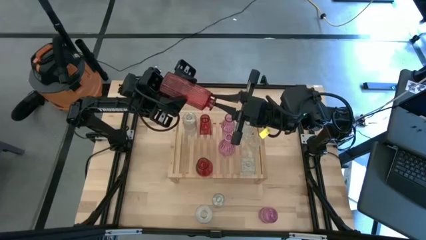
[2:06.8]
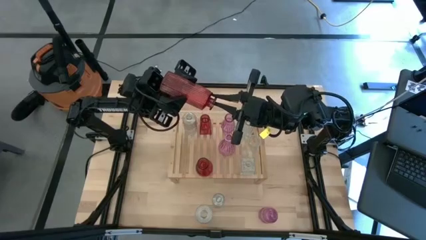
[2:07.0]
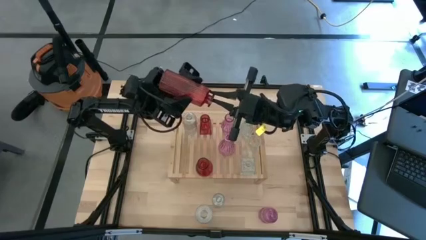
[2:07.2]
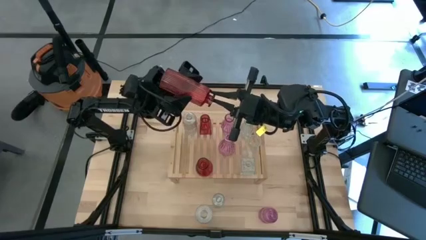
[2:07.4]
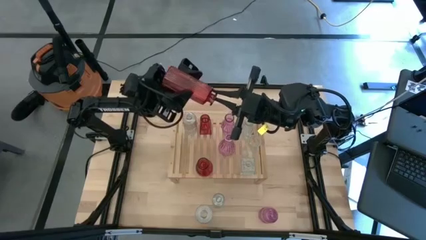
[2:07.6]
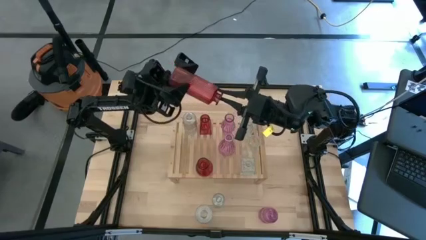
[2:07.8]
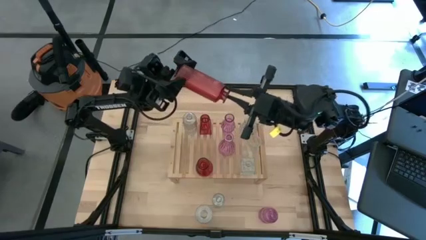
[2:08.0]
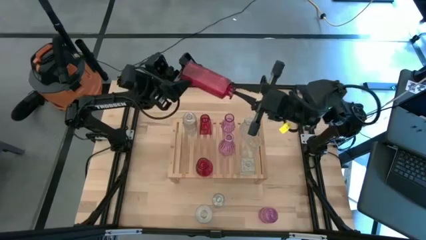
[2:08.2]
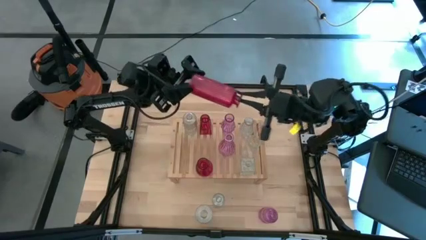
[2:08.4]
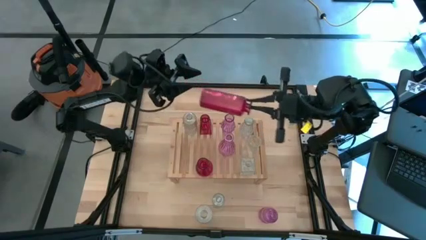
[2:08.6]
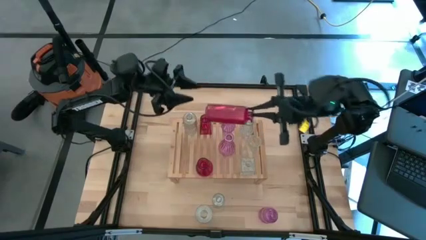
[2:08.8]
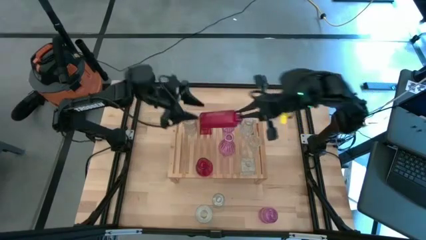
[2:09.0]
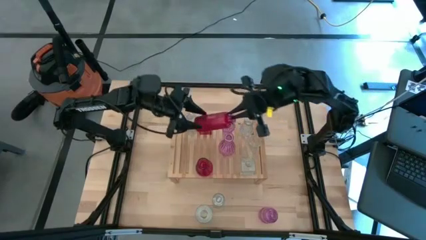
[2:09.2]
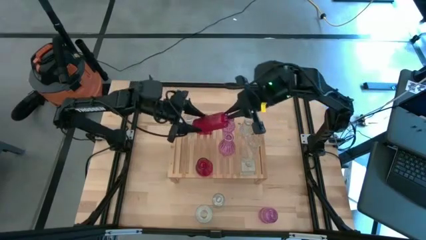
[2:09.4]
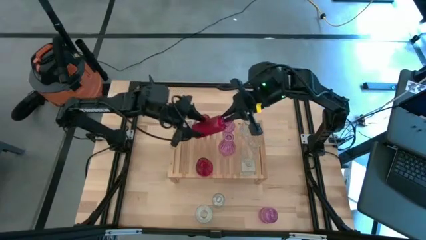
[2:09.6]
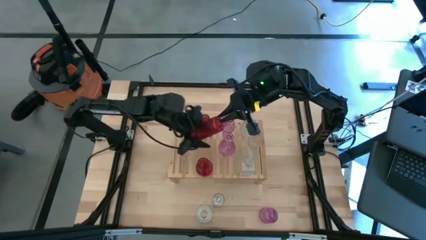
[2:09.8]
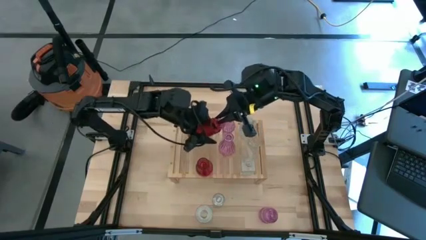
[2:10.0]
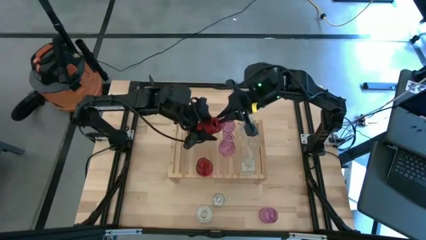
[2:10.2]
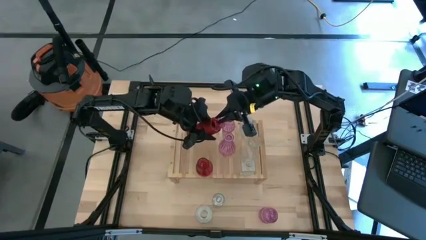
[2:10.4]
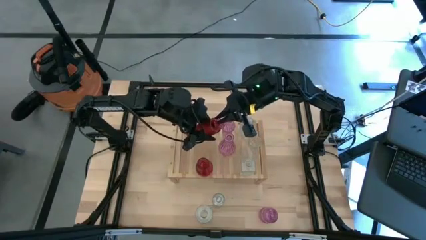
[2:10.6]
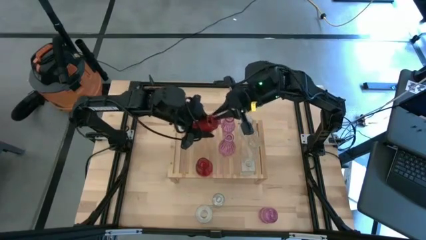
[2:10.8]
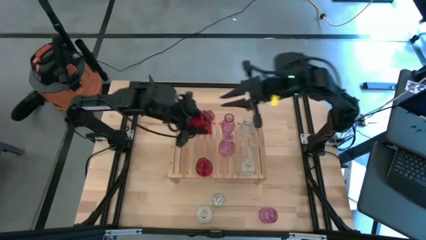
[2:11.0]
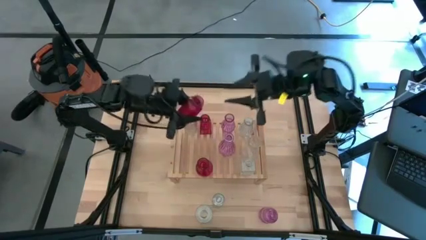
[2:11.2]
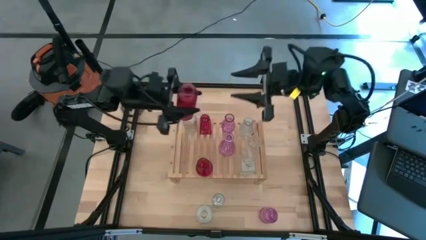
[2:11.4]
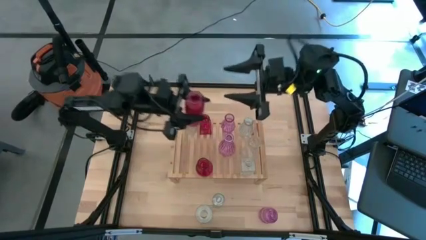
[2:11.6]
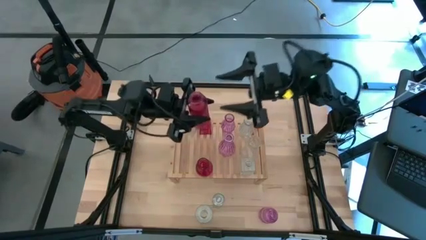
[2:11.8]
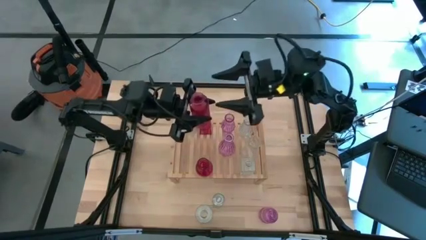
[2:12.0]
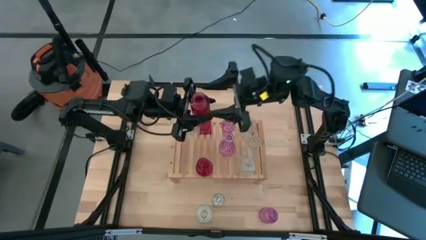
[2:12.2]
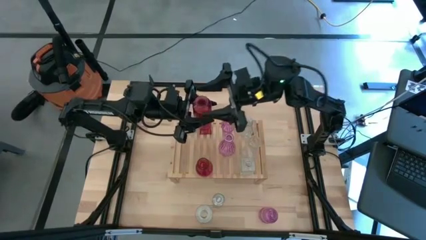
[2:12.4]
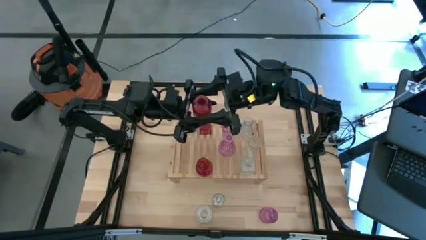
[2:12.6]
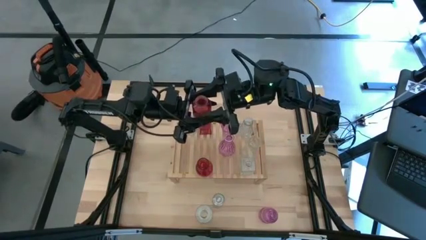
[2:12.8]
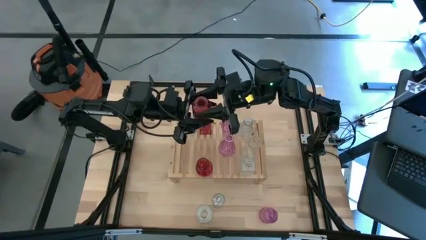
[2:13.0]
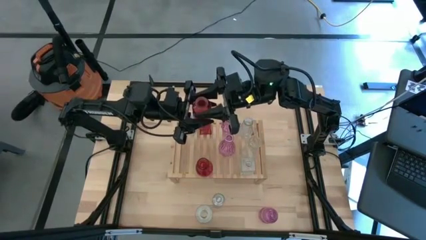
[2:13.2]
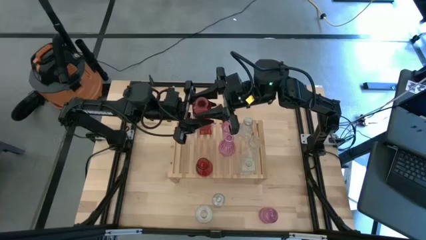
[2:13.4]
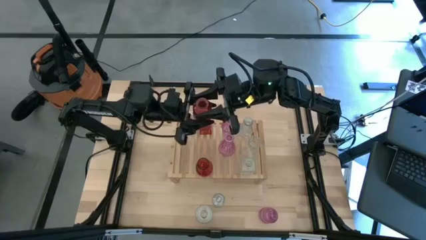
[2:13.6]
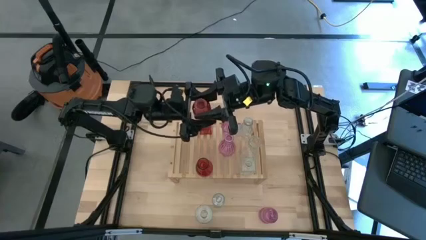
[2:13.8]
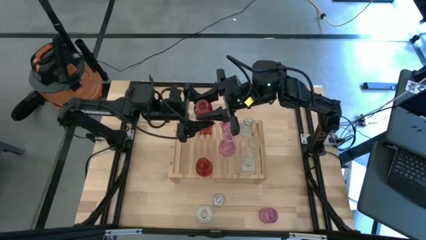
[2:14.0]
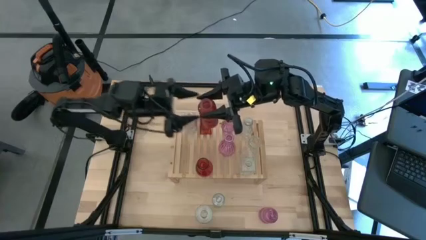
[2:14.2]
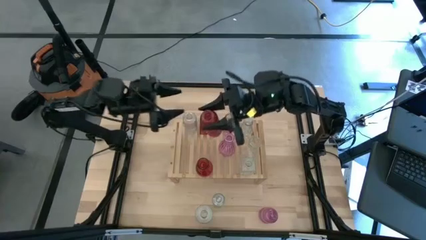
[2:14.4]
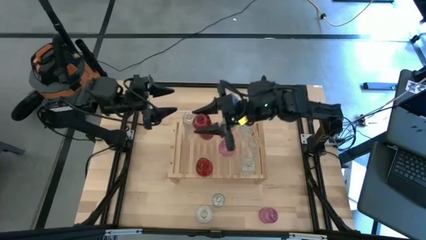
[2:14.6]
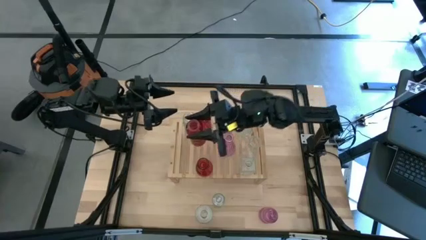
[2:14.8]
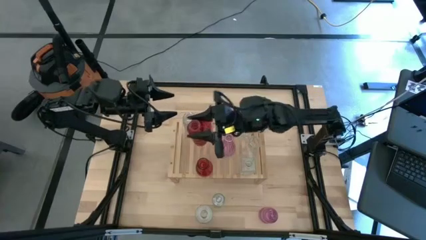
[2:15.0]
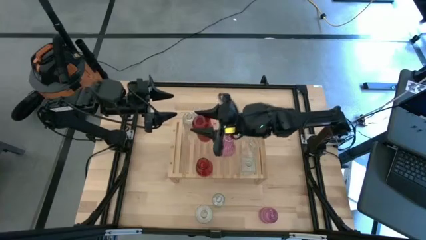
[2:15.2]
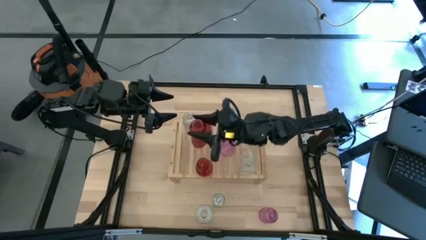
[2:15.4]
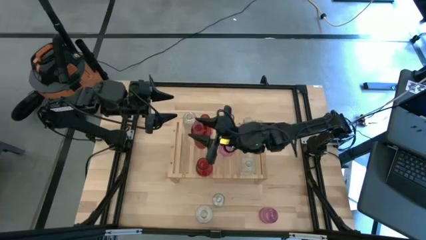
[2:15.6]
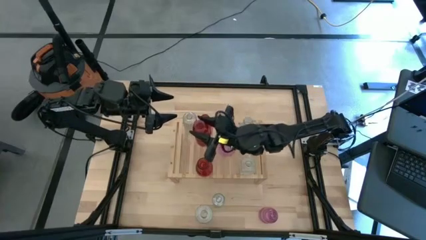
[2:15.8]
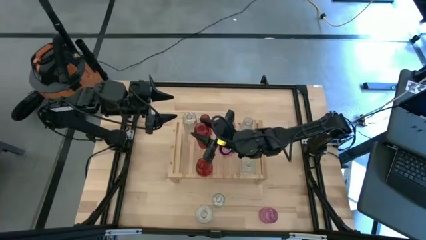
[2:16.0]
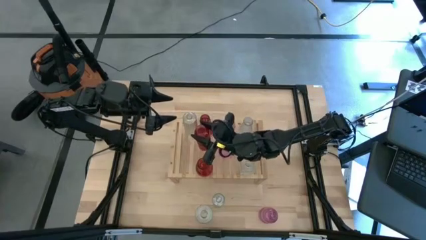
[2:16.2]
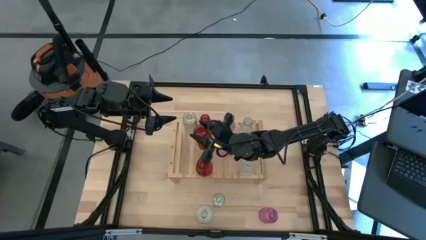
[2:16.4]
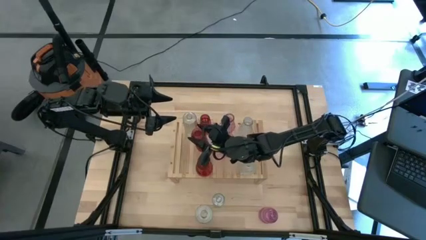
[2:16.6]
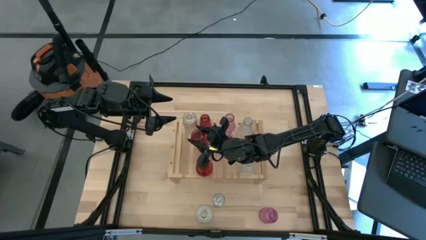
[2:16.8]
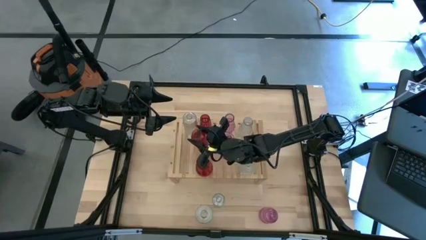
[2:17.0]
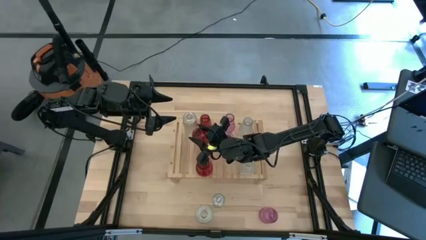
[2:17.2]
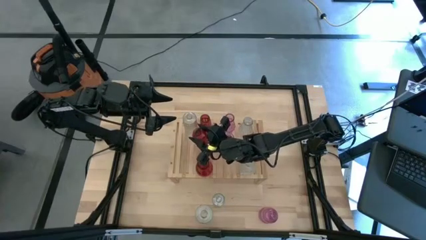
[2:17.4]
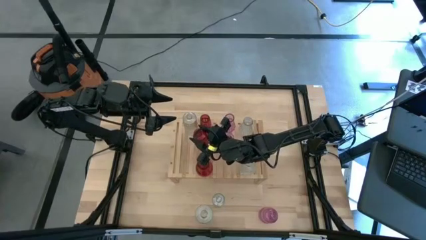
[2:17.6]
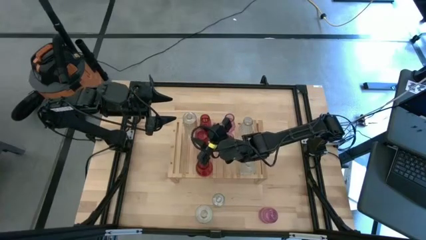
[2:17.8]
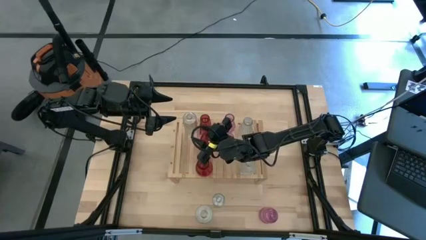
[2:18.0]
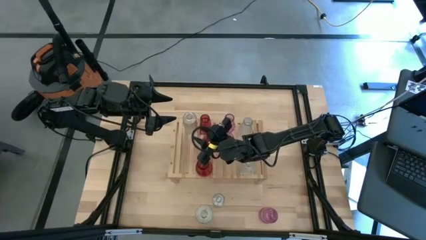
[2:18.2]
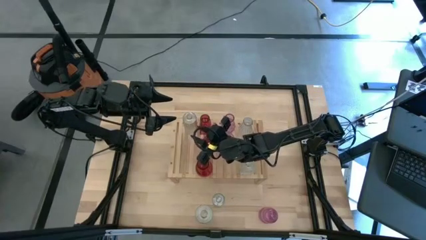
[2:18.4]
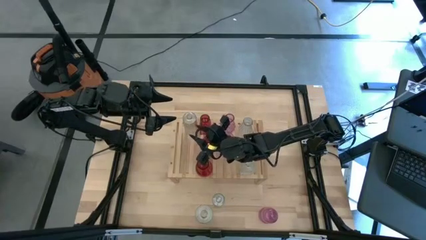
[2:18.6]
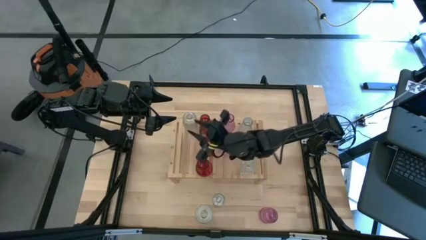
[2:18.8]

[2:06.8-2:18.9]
Task: sort vases onto shelf
Put the red vase on the shelf aligned with the other red vase

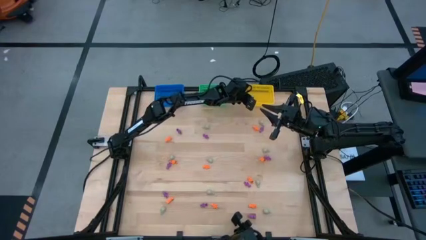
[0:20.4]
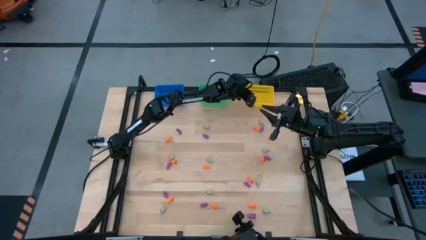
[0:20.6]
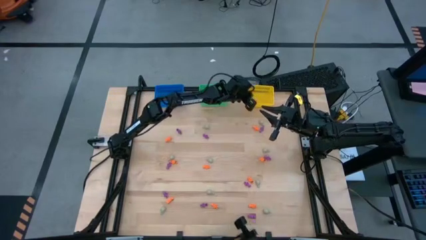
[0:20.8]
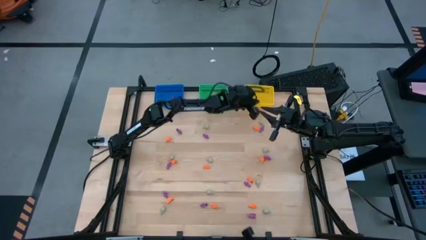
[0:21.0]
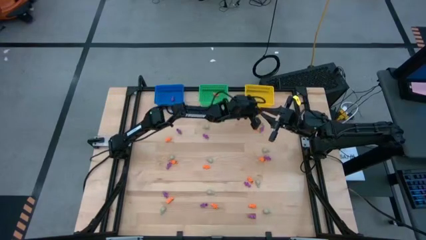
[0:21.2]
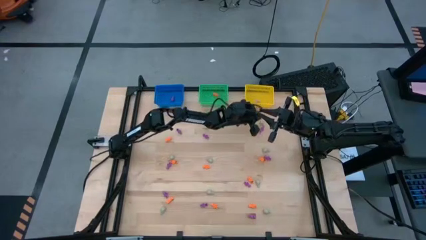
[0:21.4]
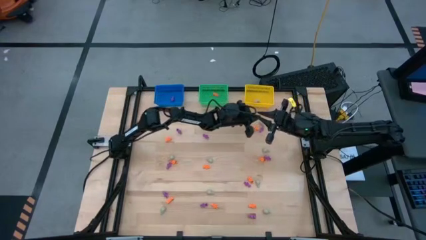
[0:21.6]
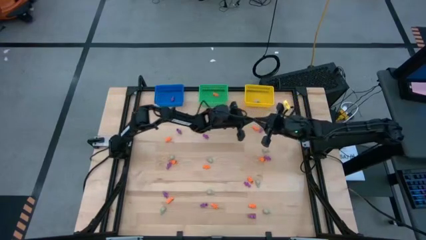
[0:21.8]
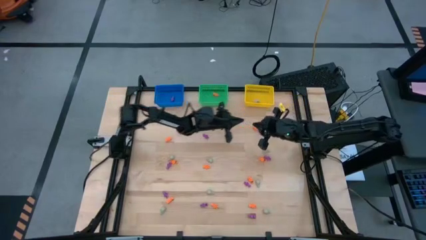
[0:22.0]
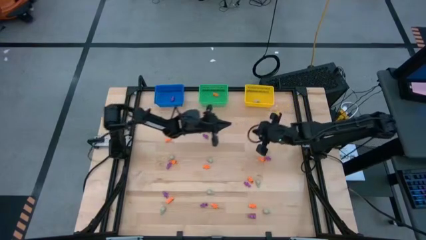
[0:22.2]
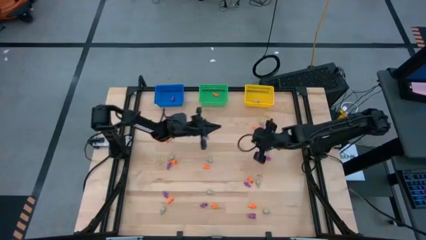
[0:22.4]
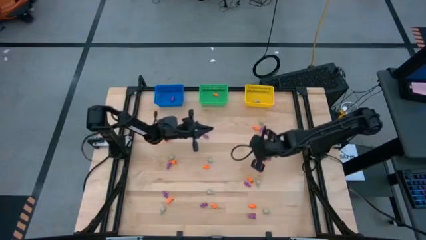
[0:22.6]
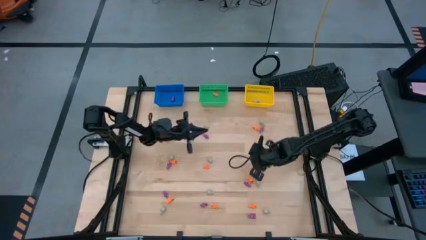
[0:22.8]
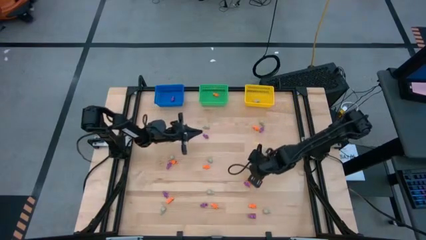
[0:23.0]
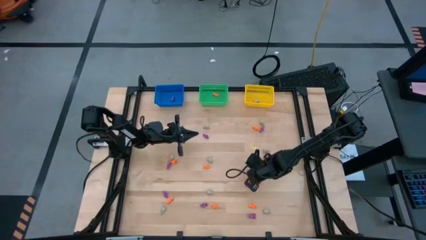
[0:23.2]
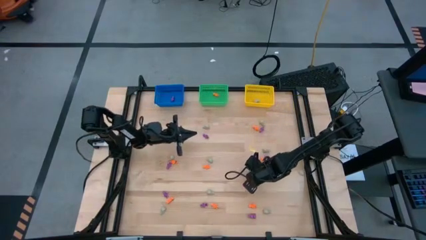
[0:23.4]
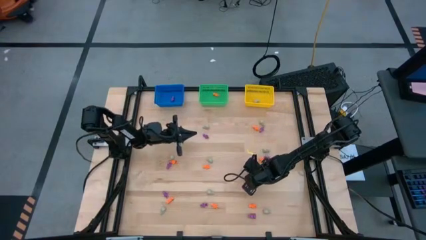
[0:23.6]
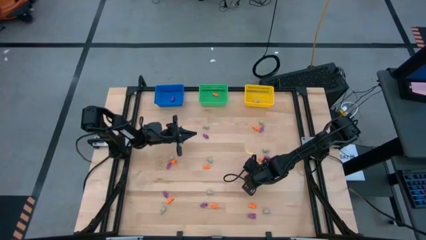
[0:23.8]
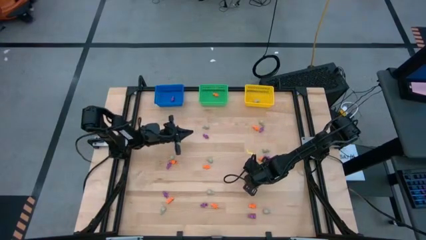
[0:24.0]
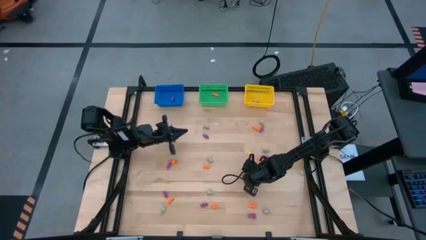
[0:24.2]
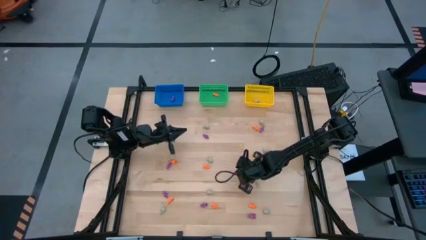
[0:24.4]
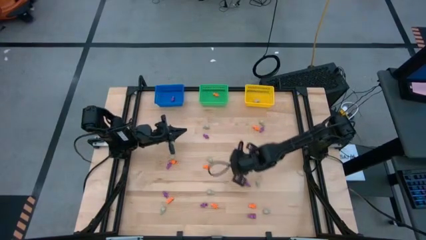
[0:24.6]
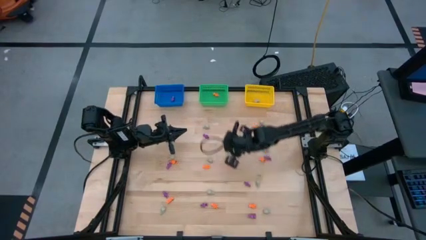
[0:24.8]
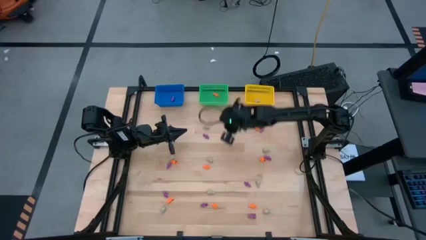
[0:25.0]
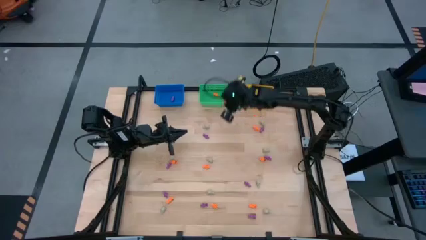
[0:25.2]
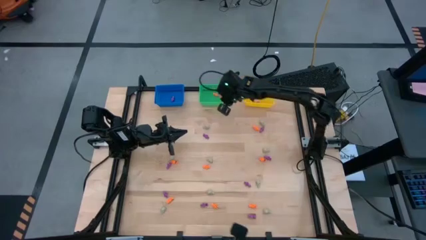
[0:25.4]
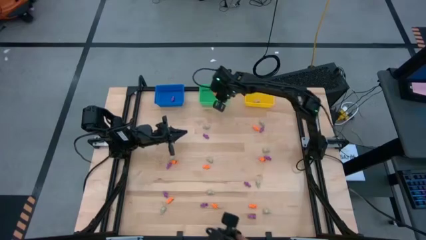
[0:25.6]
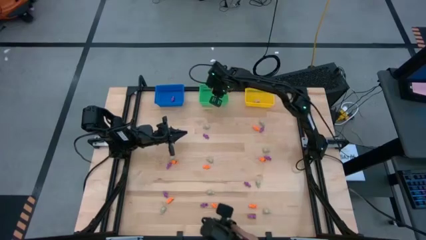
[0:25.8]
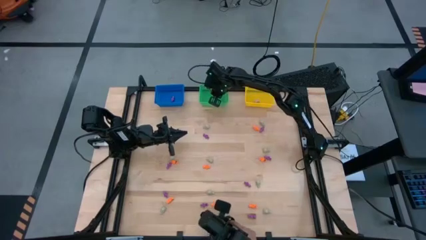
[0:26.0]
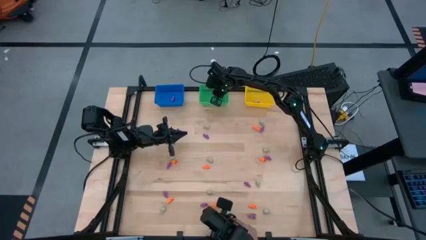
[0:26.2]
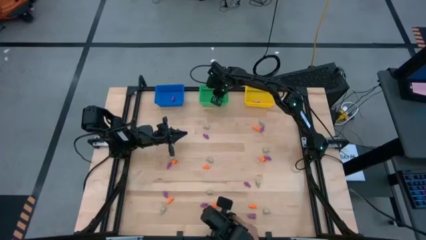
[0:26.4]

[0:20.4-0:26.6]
Task: Sort Halloween decoration
Put the orange skeleton toy into the green basket
